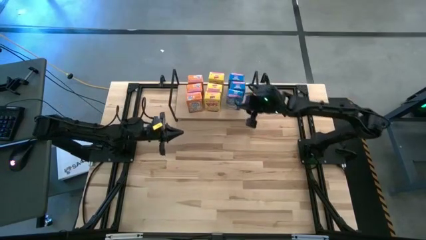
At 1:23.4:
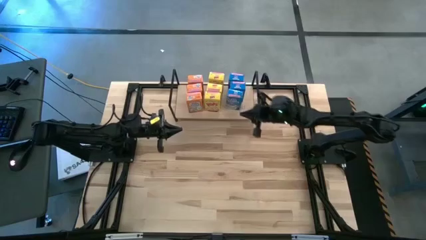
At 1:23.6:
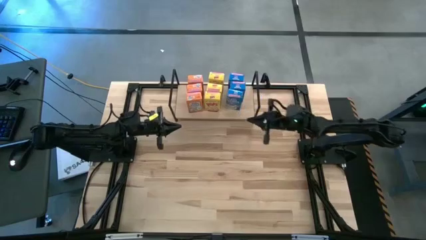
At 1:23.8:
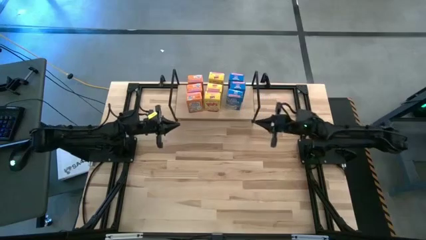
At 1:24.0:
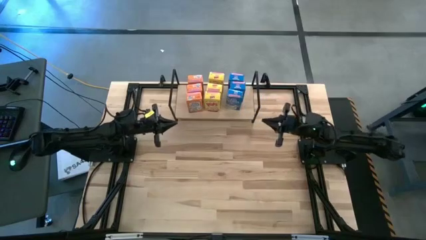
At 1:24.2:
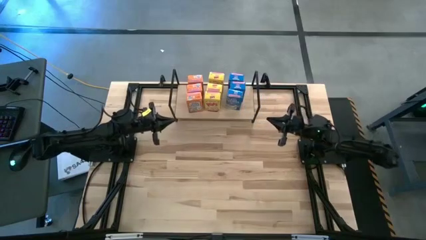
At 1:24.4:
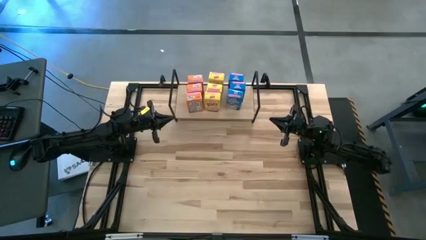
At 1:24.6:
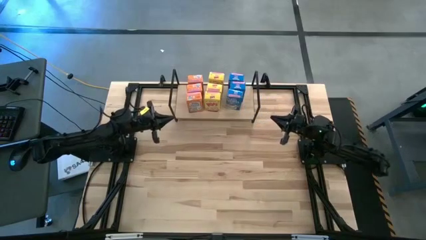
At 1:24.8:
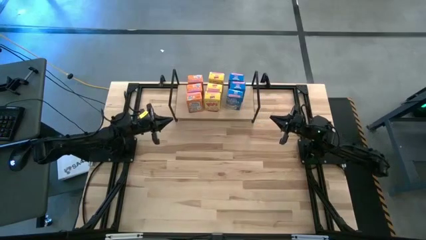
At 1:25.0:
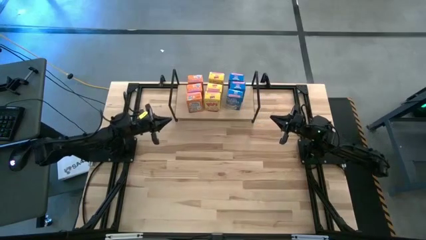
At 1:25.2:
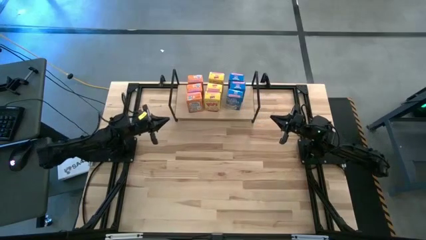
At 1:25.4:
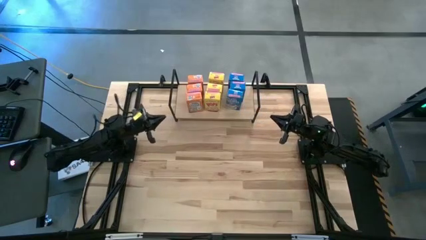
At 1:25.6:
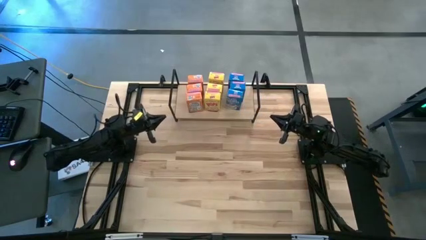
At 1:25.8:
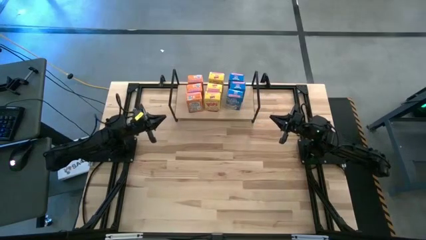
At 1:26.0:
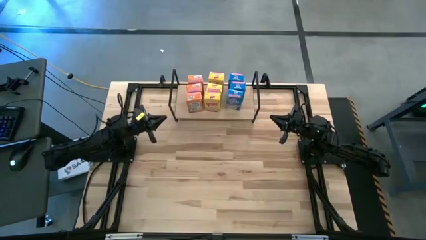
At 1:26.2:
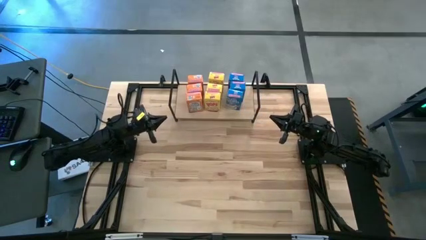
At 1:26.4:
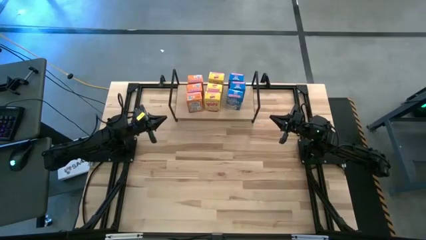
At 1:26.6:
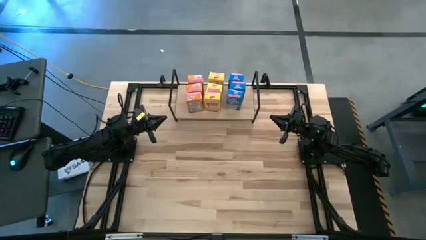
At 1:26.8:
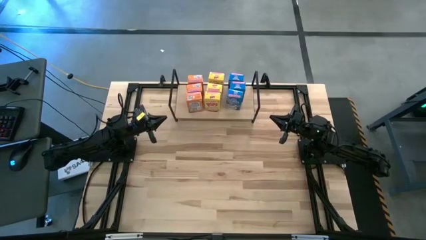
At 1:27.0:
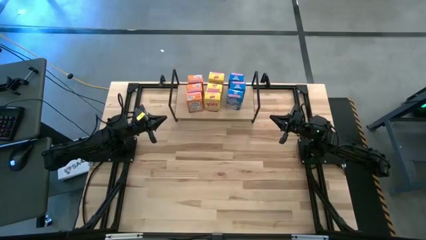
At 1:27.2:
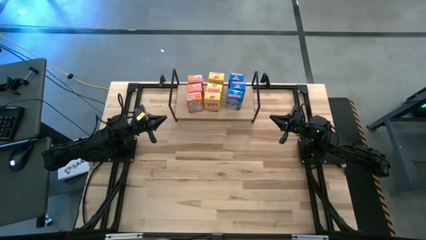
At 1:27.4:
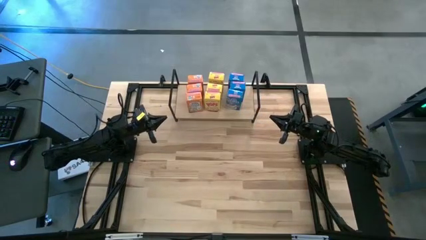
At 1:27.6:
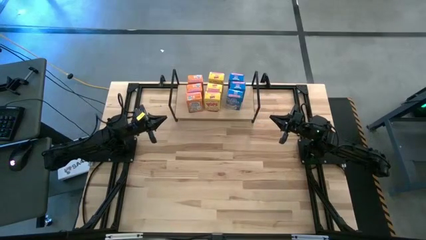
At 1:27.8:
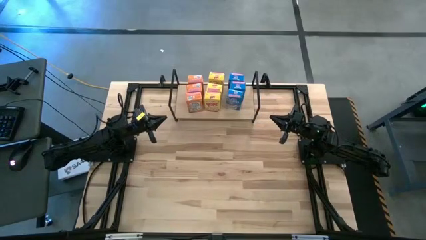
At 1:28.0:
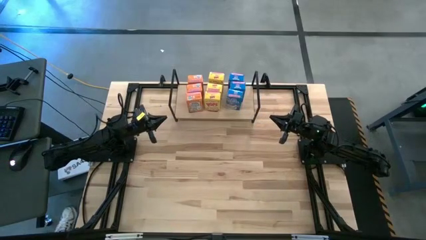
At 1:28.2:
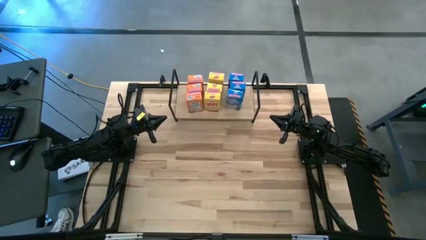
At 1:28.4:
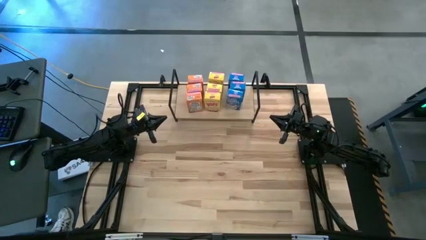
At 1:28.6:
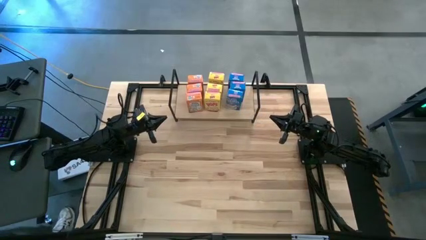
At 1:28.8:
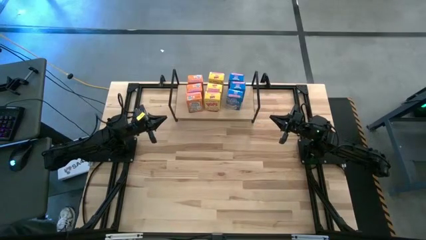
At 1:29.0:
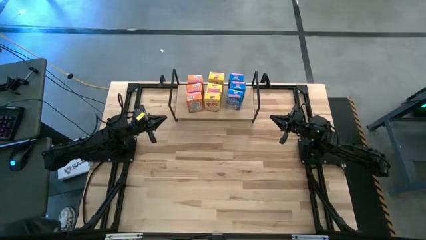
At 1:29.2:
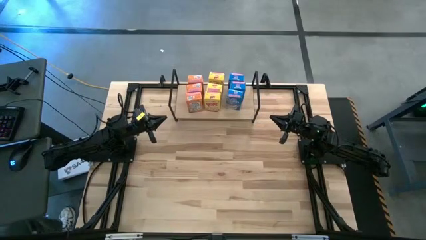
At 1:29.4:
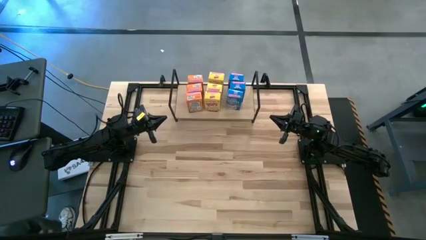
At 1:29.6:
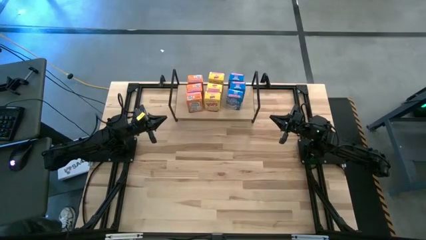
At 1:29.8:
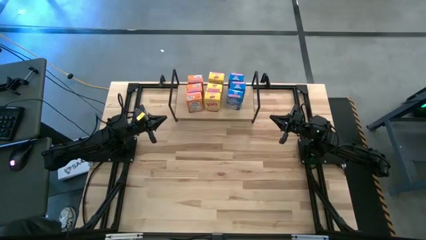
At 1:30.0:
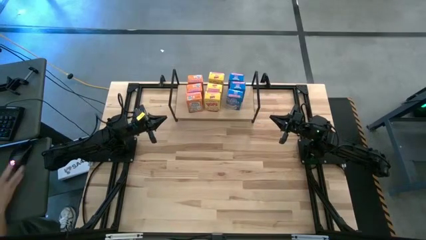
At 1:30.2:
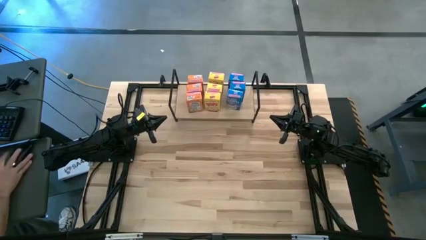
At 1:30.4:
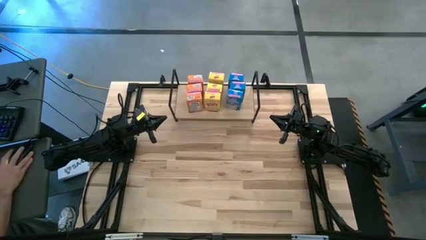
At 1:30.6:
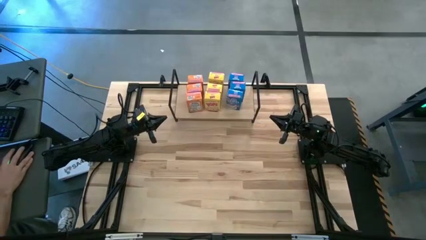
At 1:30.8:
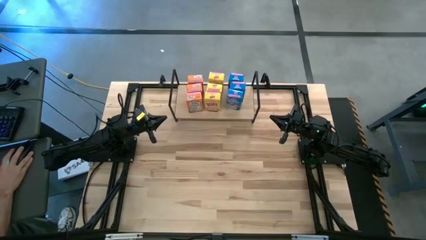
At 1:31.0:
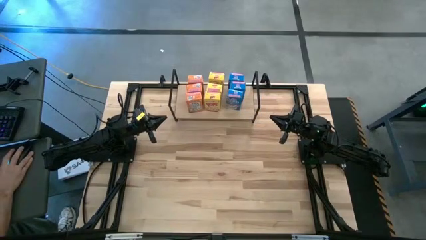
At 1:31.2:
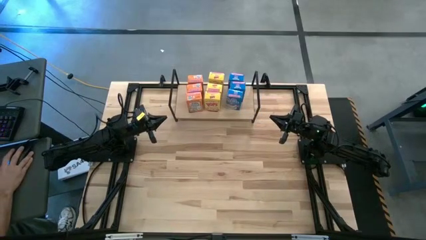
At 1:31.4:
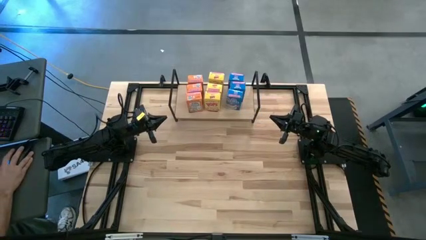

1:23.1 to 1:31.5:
Task: Stack cereal on shelf
Return to Home Position

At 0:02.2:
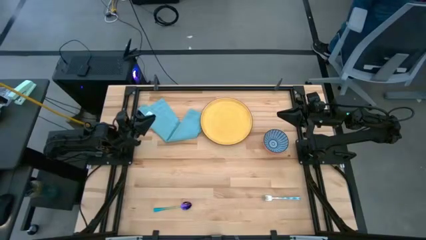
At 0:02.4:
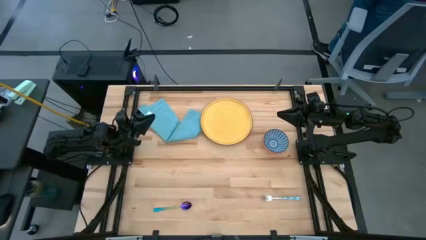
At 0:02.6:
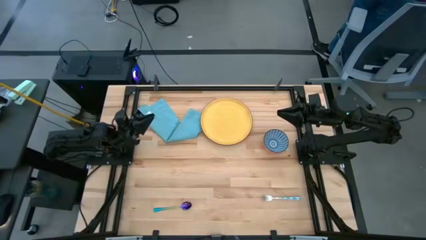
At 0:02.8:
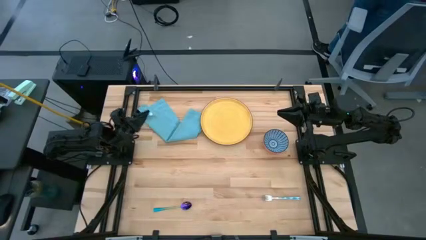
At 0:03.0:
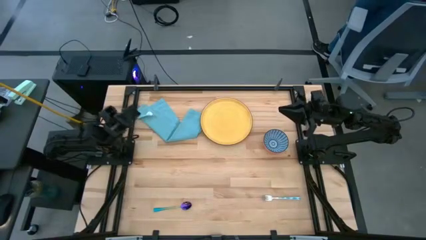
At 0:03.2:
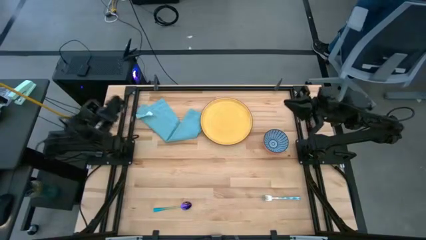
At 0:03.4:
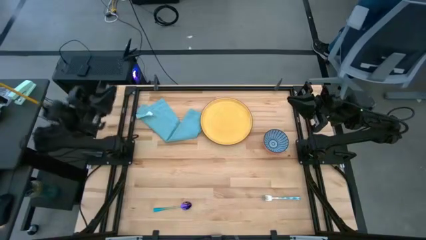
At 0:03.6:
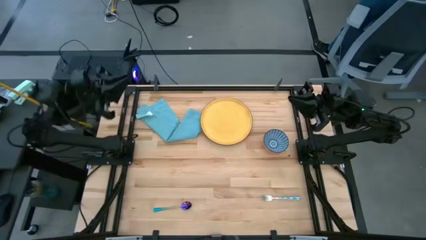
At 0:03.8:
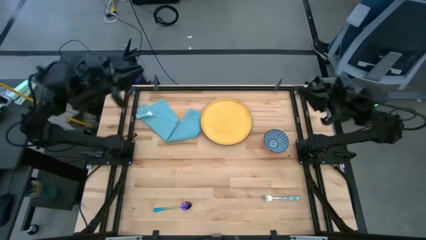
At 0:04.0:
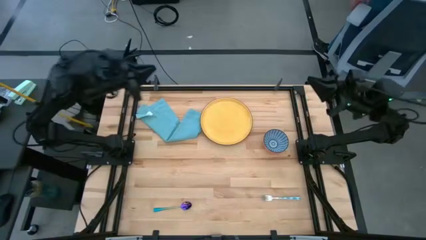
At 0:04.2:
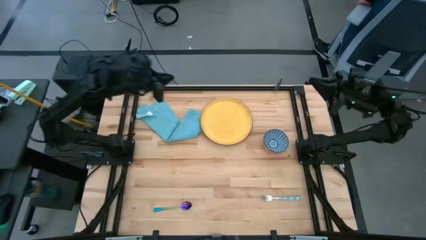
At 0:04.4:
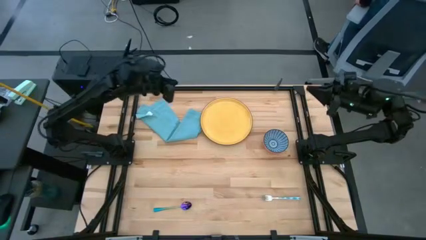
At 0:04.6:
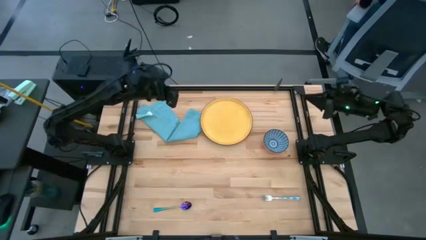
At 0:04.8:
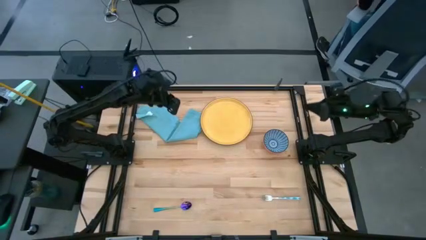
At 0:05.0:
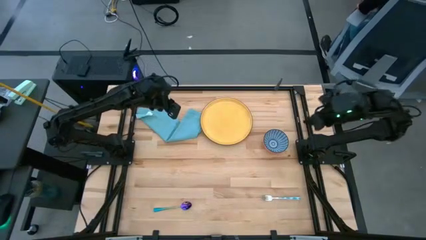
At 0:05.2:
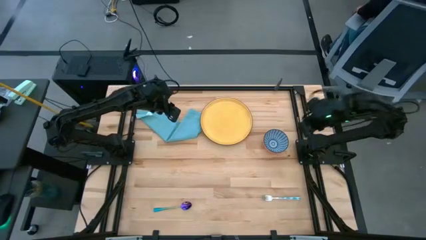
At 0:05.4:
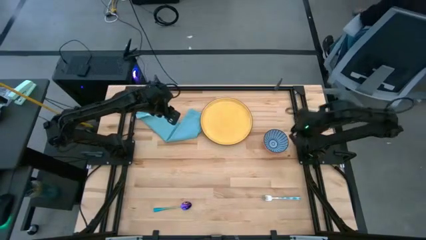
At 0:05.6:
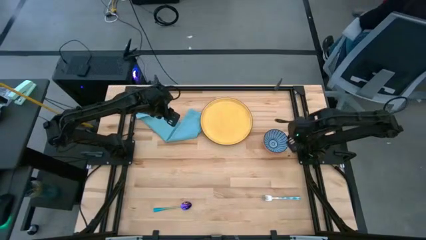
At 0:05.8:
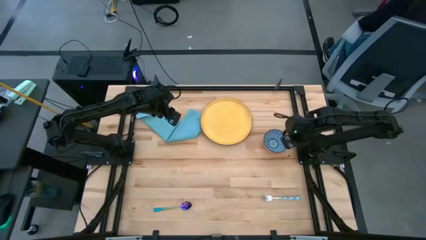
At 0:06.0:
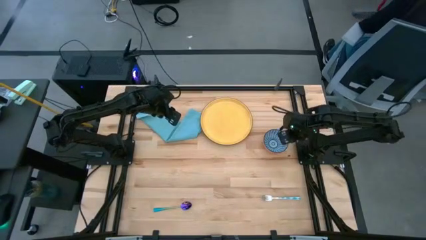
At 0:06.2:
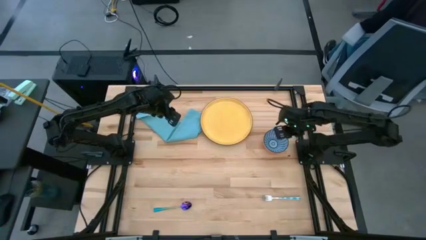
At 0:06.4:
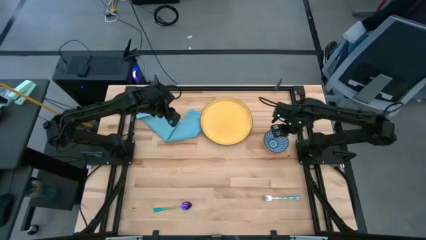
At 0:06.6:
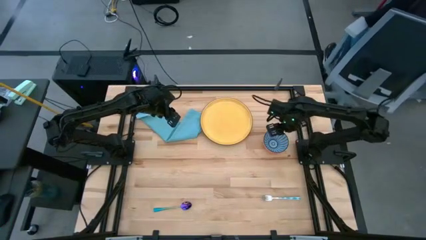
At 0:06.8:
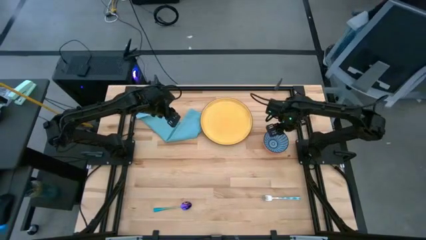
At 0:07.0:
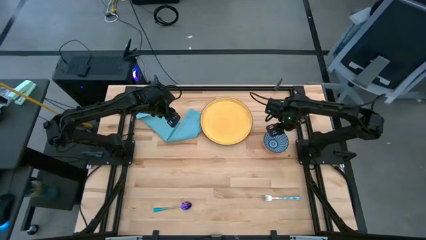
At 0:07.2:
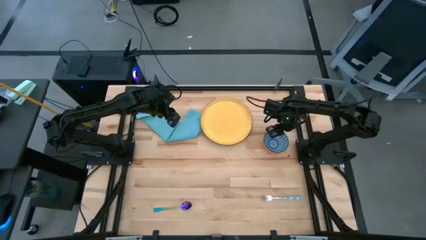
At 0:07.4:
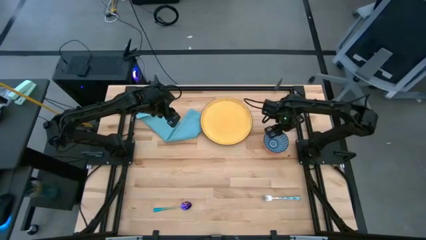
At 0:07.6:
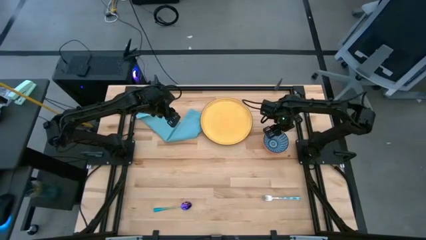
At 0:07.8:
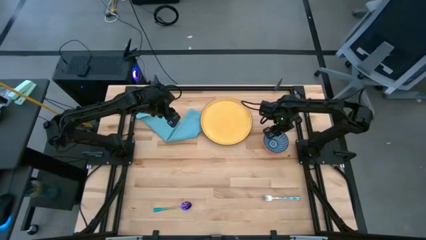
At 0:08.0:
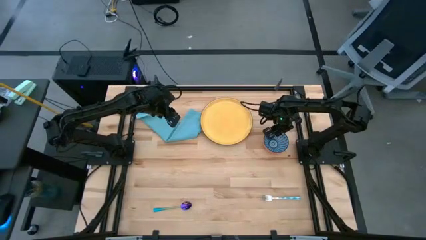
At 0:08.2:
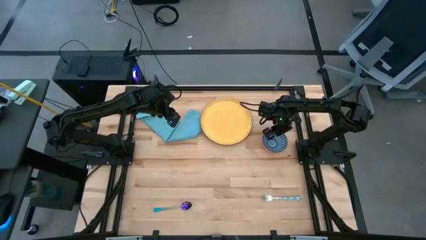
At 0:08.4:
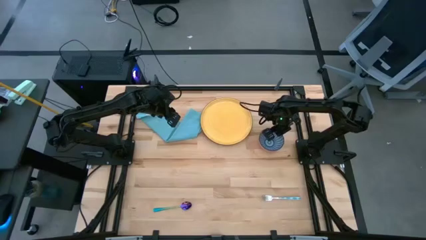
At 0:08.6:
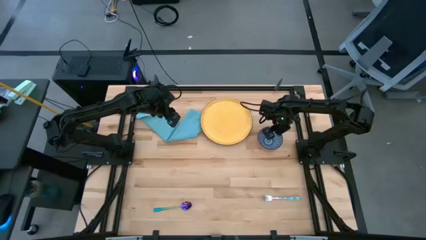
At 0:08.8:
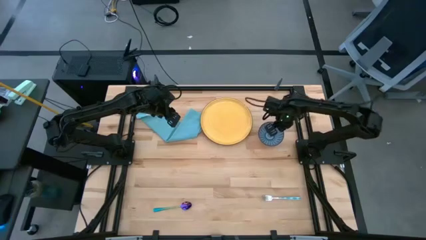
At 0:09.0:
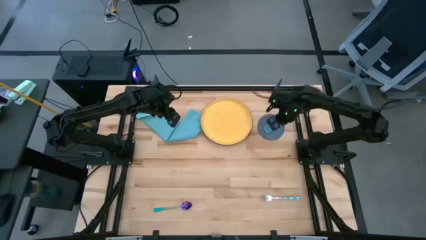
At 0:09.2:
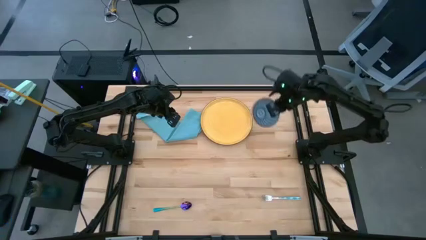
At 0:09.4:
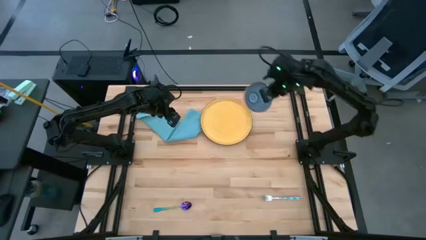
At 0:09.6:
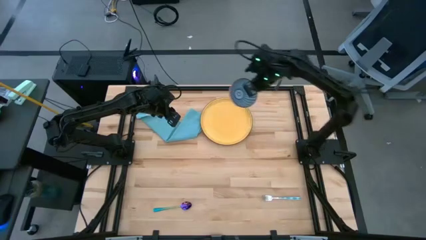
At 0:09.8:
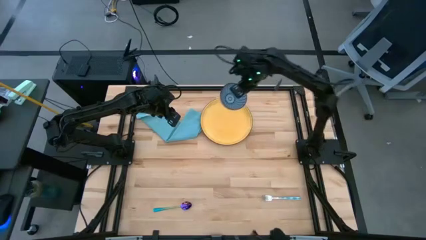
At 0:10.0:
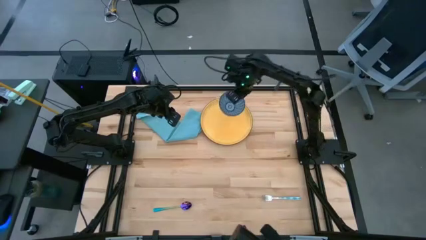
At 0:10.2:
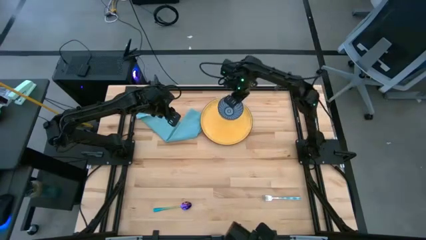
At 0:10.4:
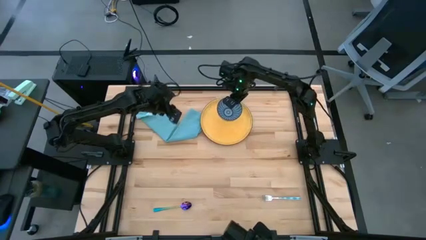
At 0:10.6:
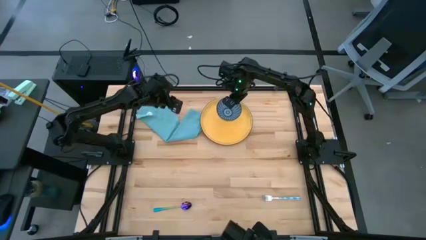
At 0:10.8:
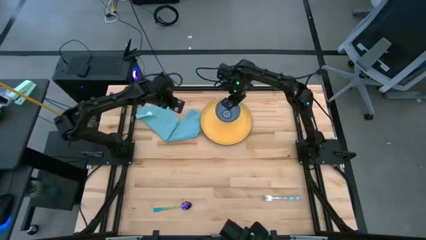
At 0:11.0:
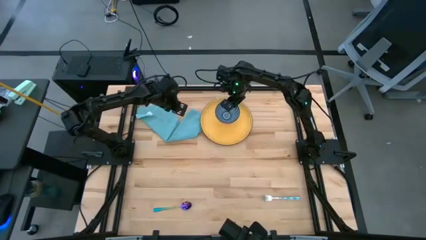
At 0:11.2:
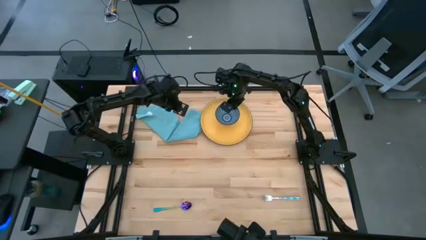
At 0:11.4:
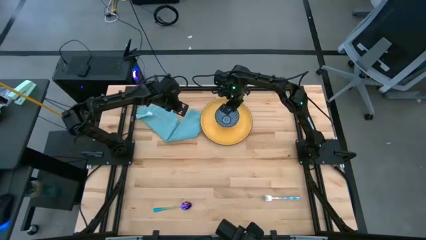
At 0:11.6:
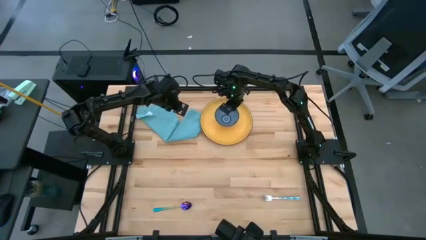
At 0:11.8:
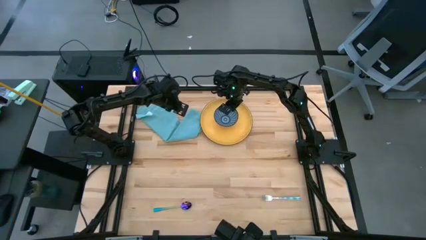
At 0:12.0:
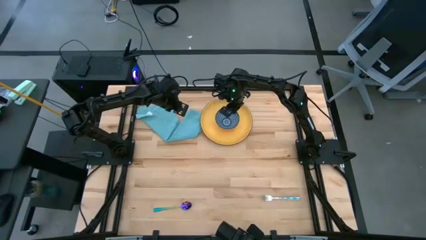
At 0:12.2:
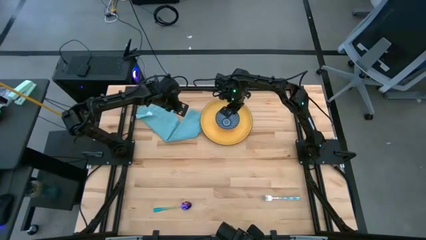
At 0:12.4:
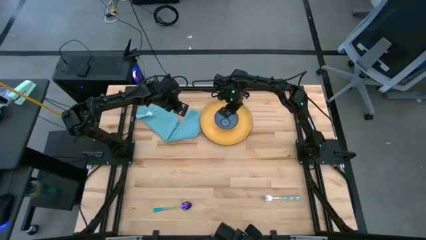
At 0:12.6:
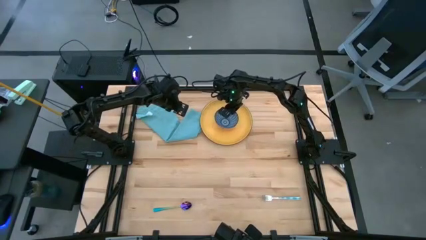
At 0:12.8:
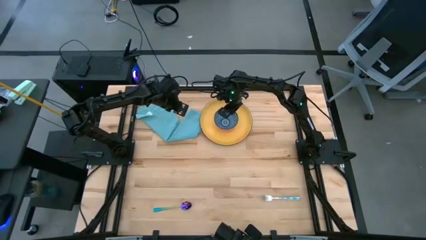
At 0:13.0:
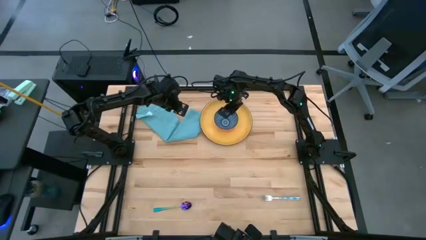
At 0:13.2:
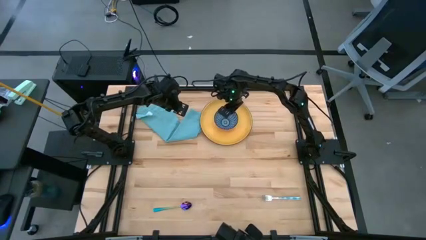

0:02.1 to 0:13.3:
Task: Set table place
Put the blue bowl on the yellow plate
